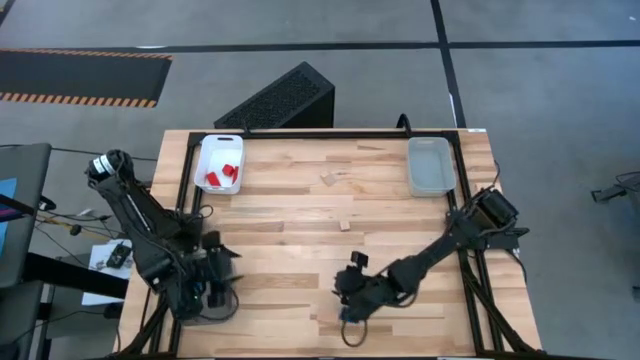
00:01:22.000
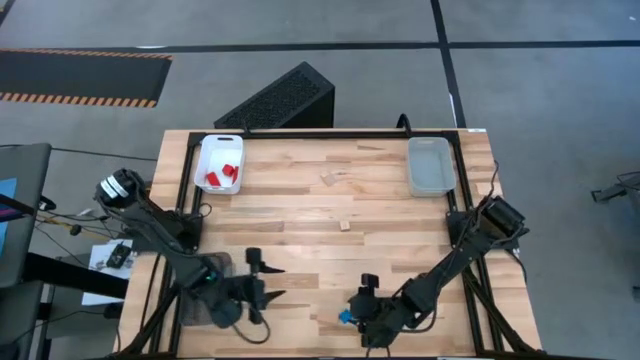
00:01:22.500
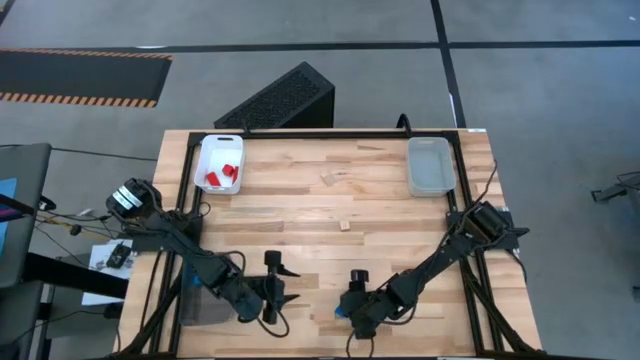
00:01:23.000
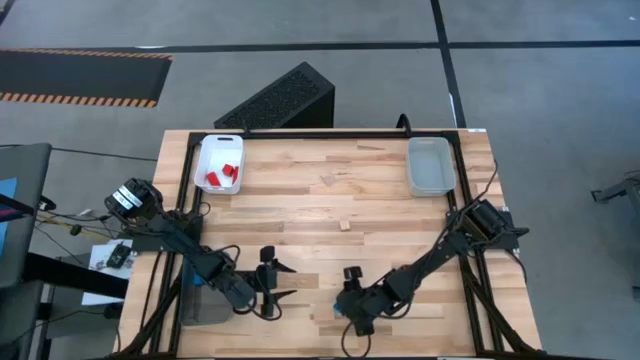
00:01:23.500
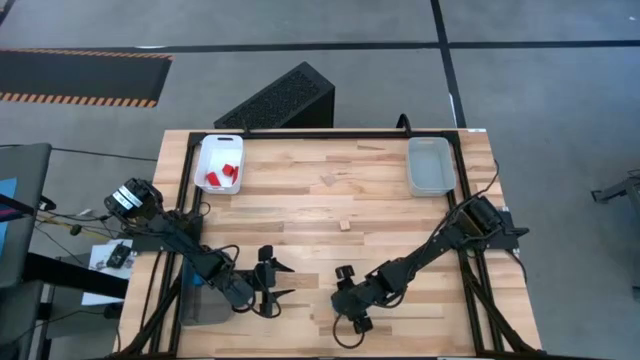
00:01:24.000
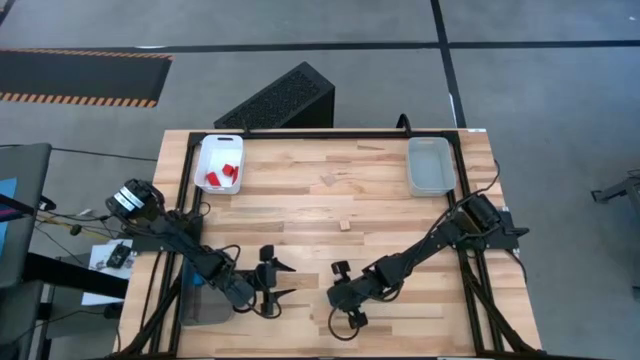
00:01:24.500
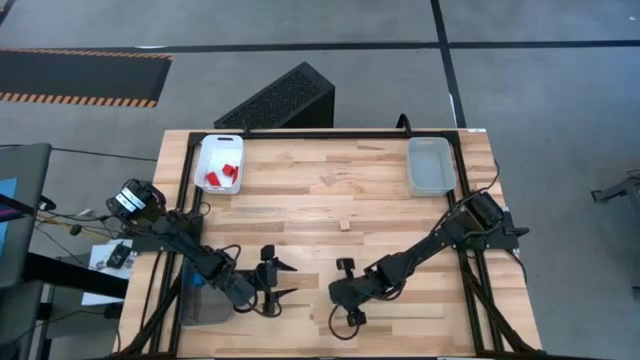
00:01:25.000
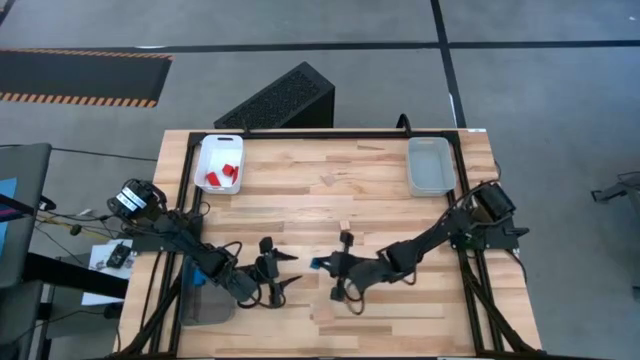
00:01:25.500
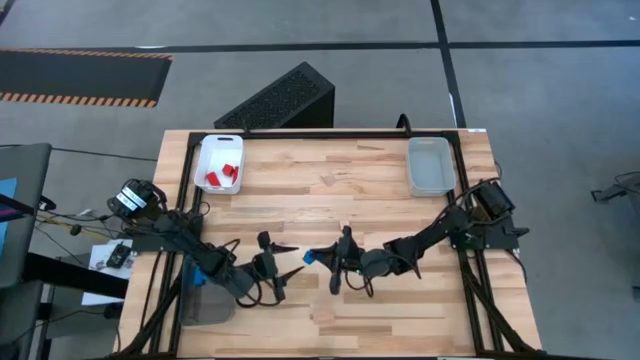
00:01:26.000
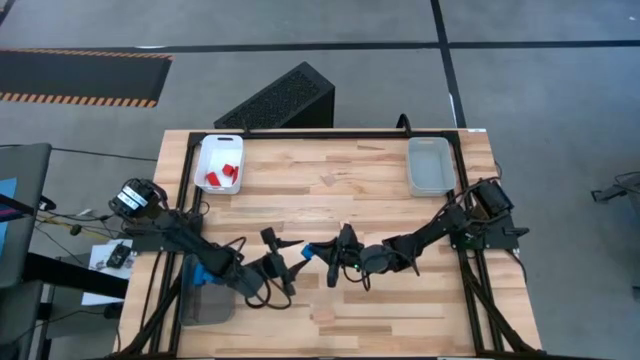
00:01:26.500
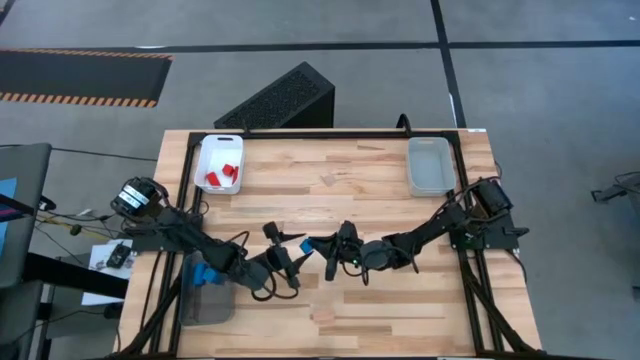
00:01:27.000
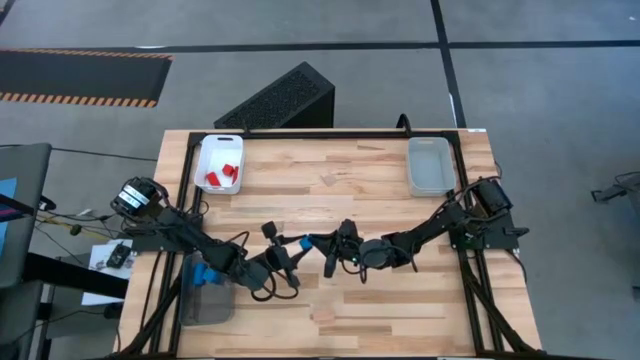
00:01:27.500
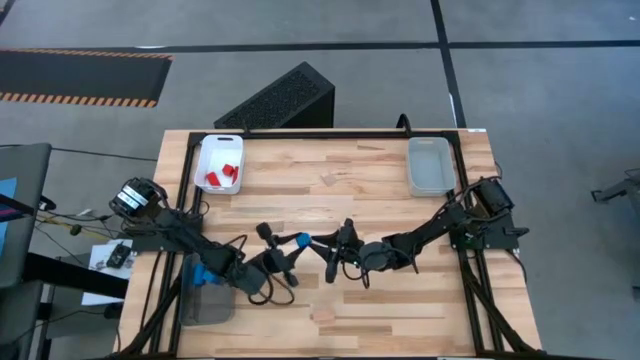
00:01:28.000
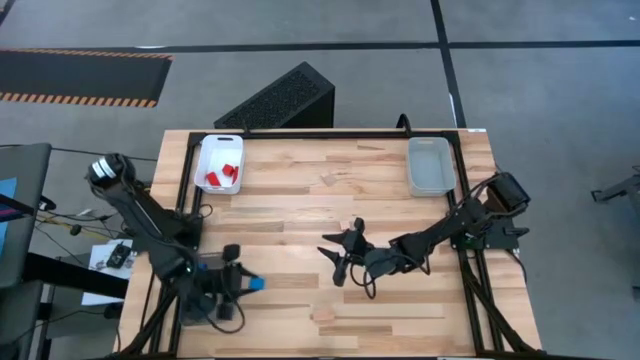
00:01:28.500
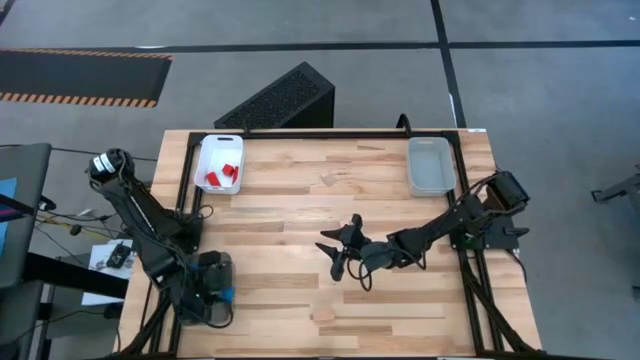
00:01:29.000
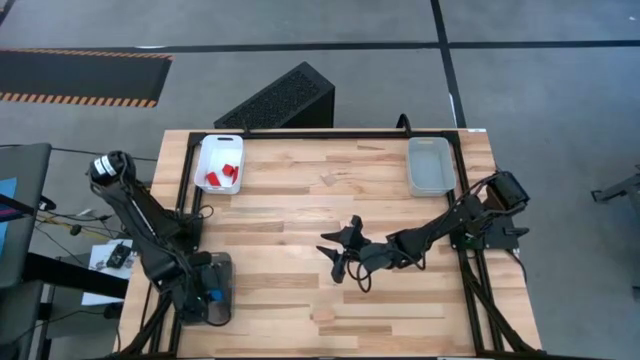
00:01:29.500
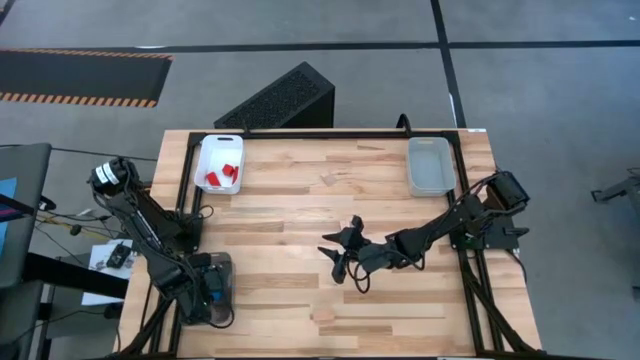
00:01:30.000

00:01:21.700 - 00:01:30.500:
Task: Sort & place blocks by color
Put the blue block into the black bin

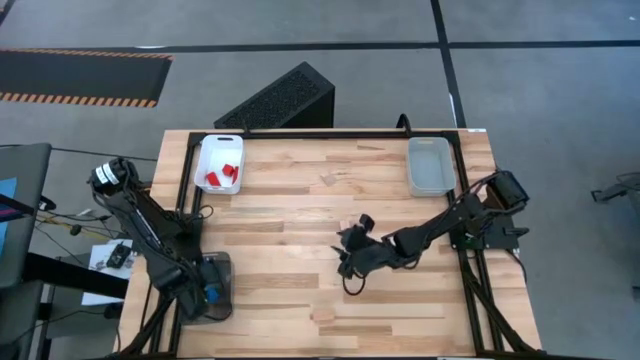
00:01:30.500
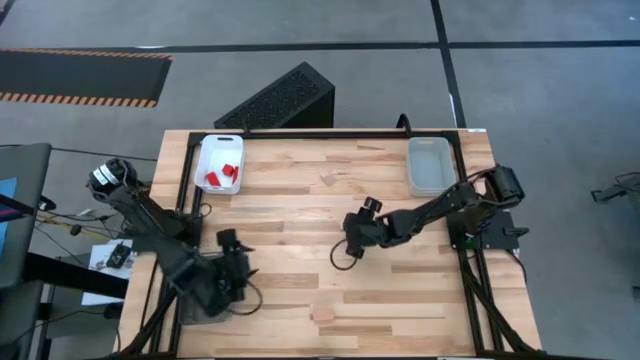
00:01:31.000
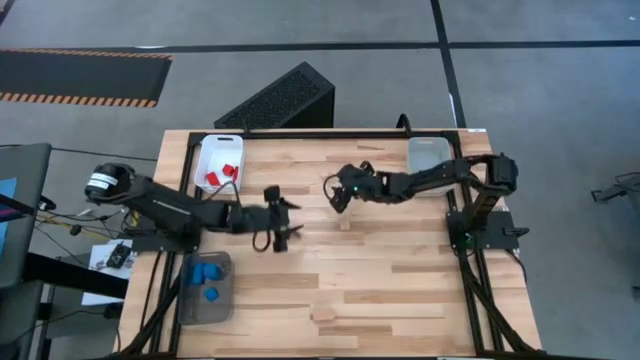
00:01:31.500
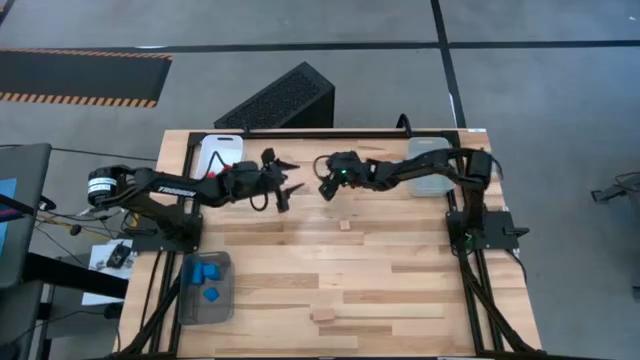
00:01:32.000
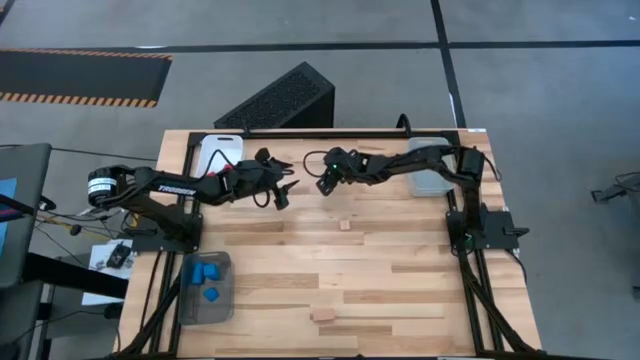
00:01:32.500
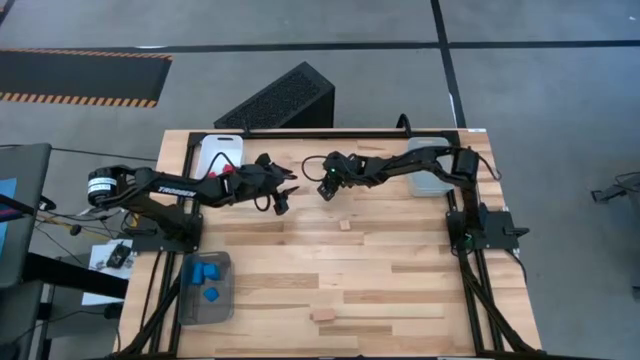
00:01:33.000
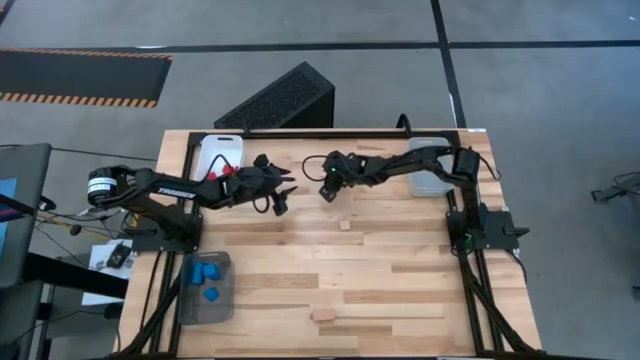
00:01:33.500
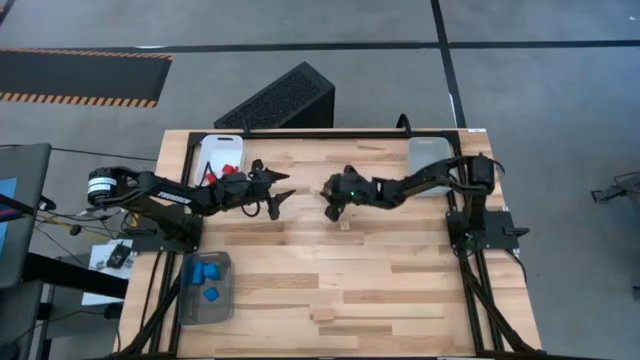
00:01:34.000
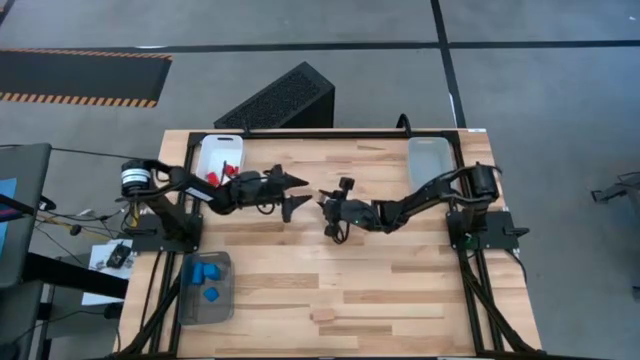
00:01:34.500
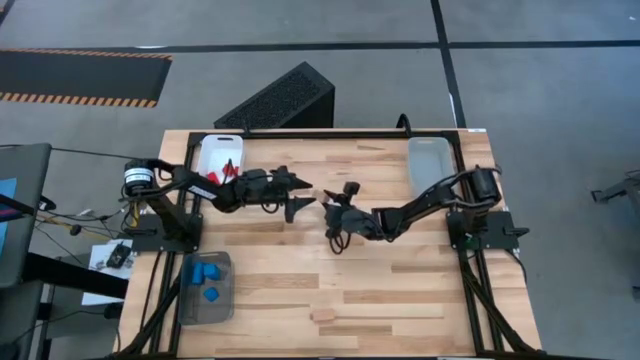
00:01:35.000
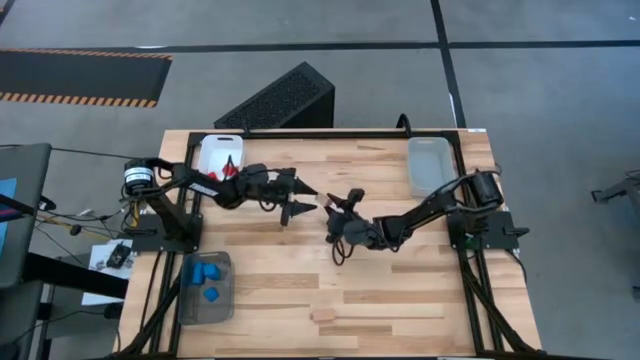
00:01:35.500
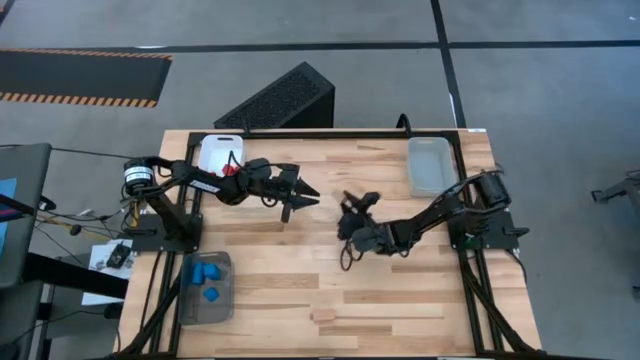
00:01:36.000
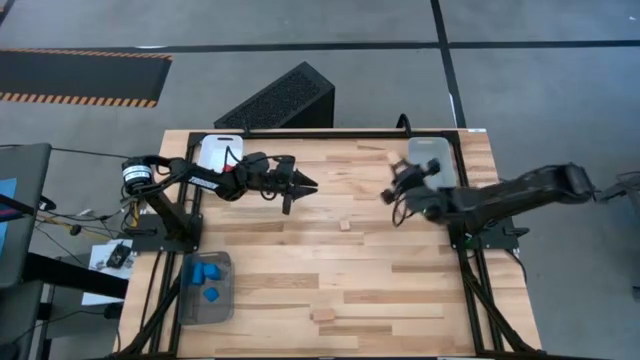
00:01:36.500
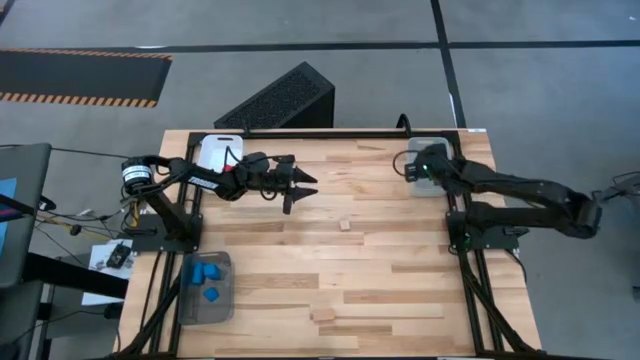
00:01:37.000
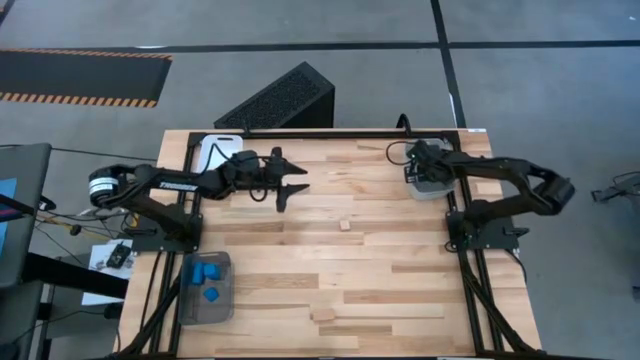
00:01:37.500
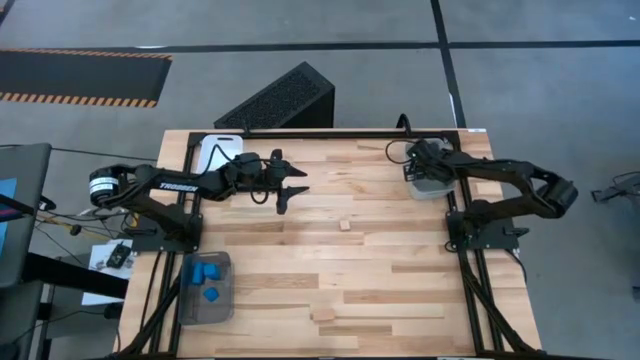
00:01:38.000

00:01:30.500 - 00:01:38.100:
Put the top brown block into the gray bin

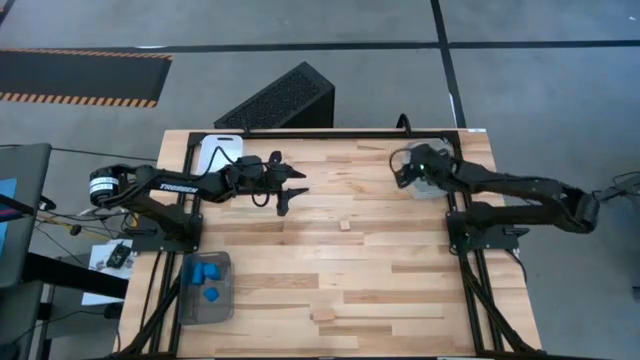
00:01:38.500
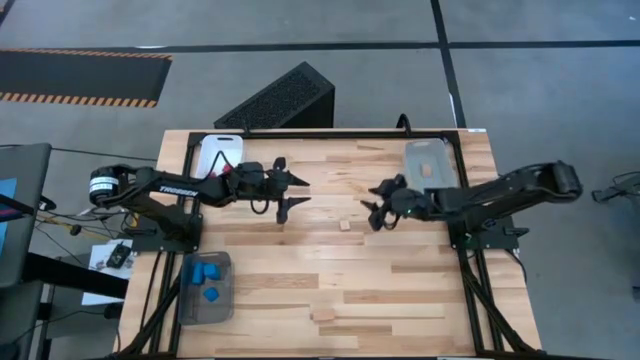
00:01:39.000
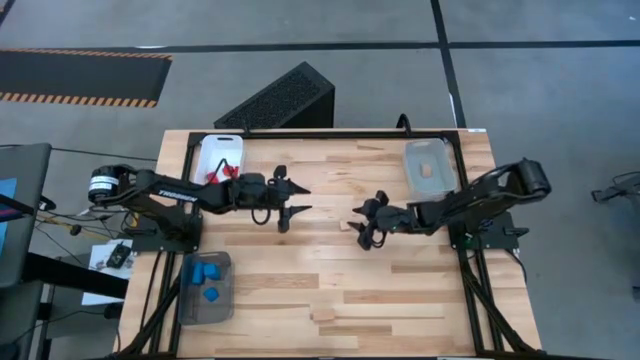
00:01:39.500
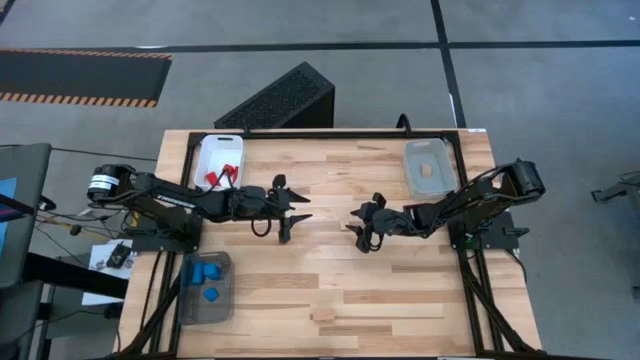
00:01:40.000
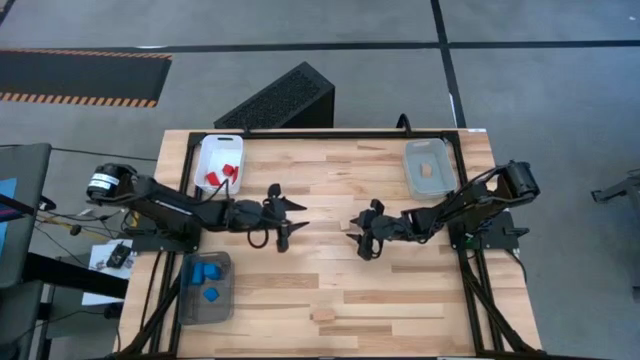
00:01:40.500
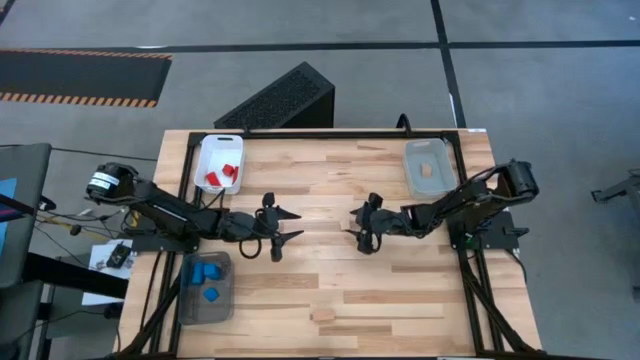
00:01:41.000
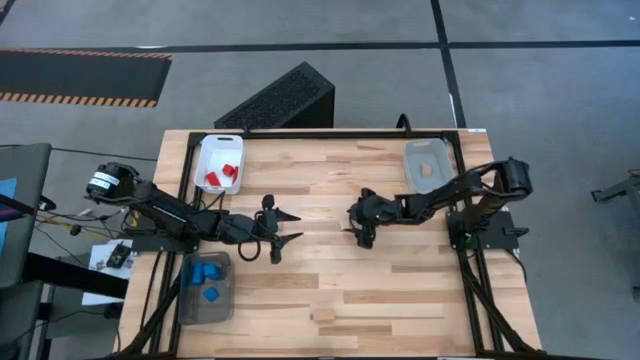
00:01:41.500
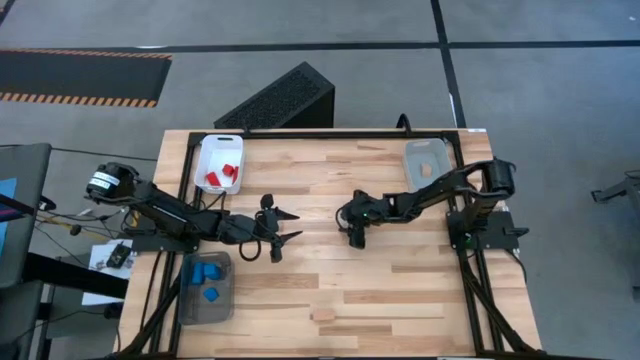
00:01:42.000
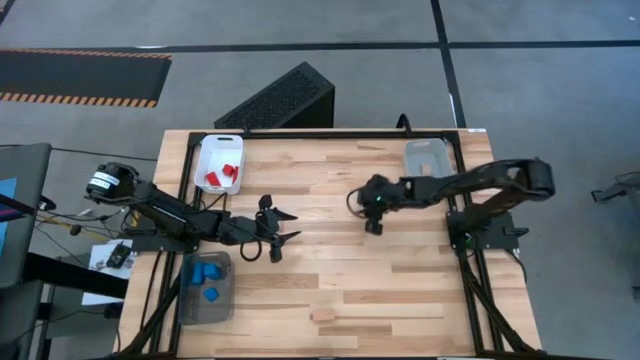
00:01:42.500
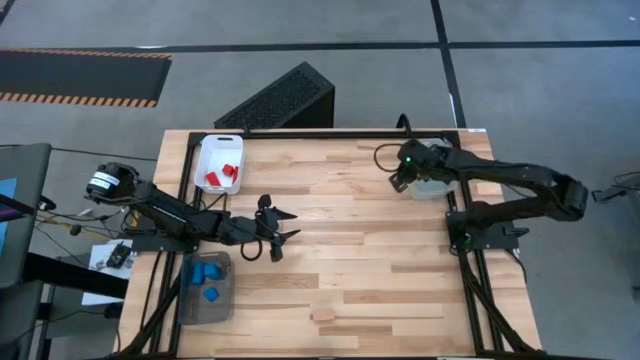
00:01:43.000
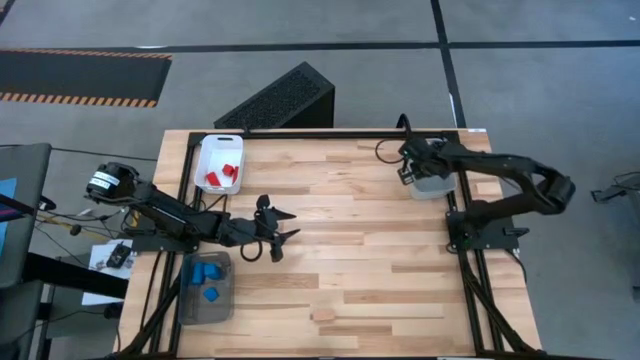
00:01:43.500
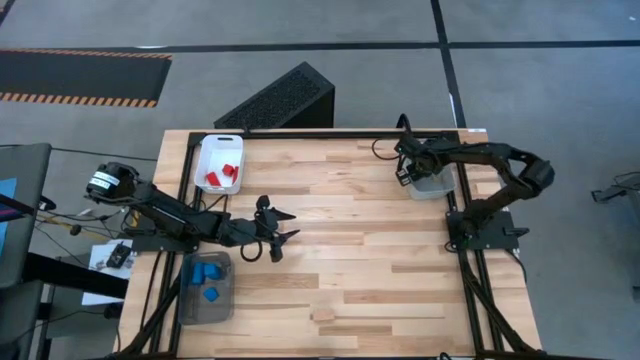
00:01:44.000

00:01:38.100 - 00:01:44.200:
Put the top brown block into the gray bin
